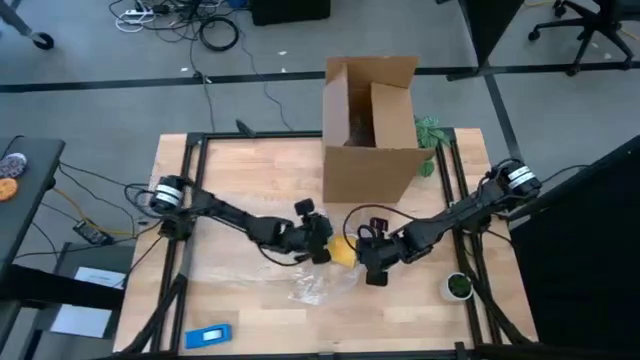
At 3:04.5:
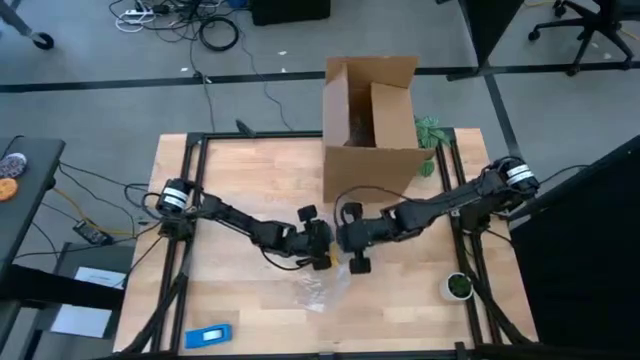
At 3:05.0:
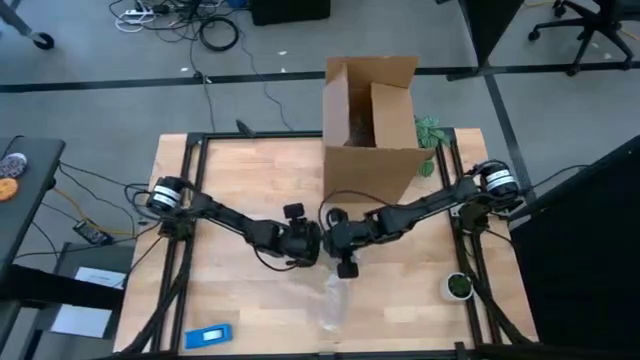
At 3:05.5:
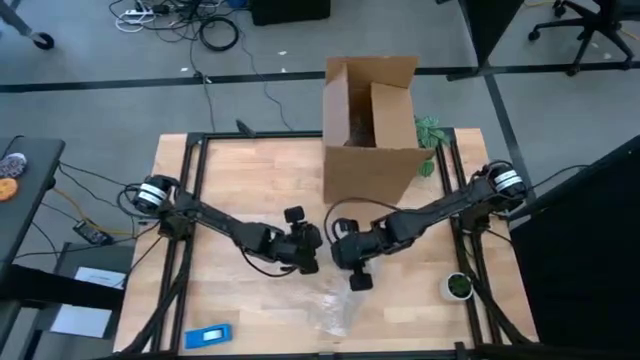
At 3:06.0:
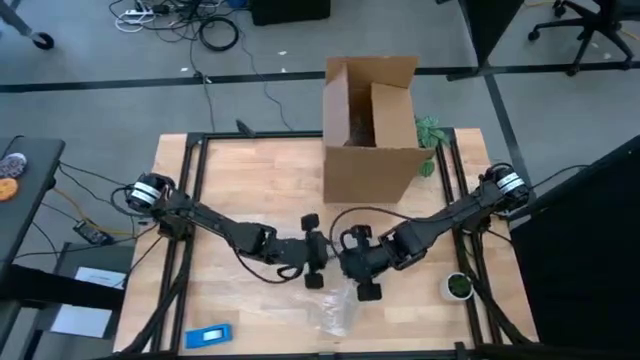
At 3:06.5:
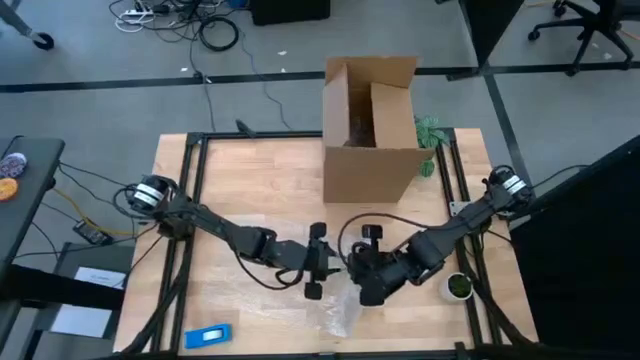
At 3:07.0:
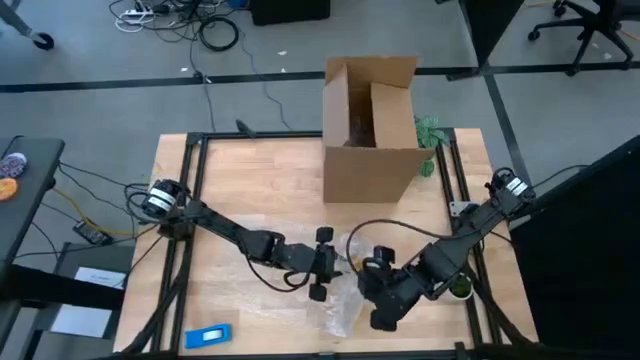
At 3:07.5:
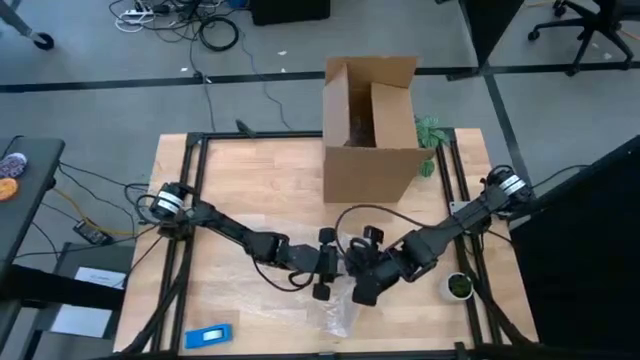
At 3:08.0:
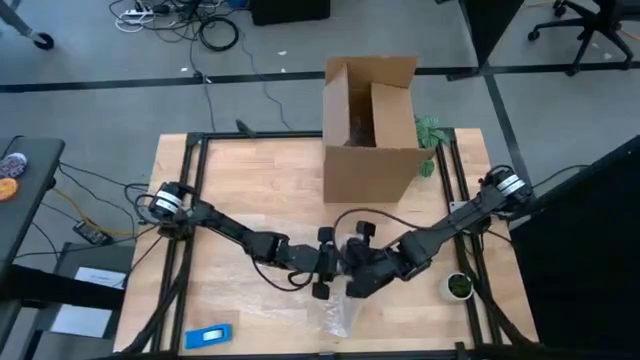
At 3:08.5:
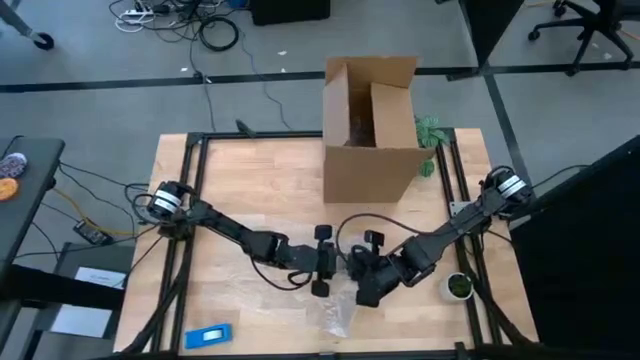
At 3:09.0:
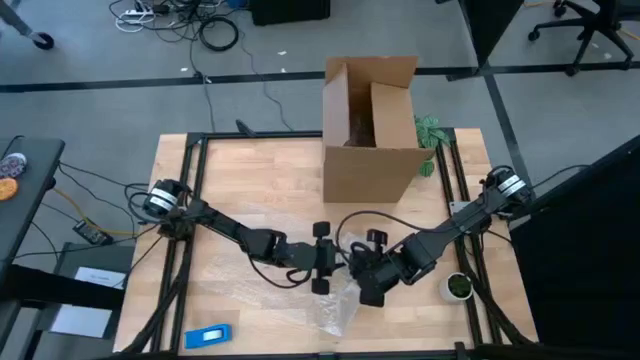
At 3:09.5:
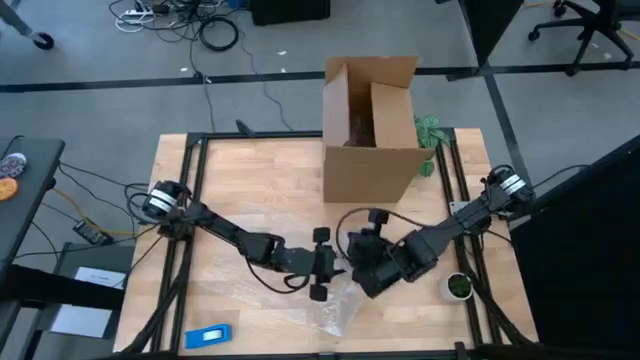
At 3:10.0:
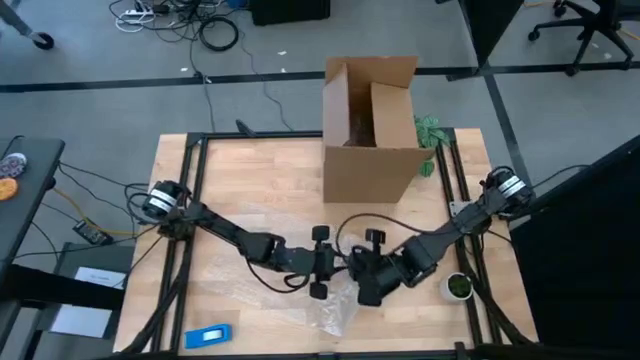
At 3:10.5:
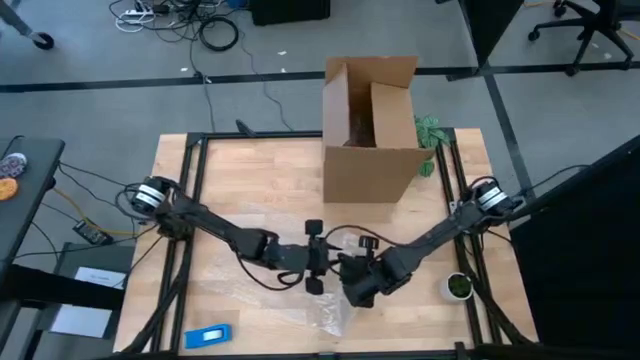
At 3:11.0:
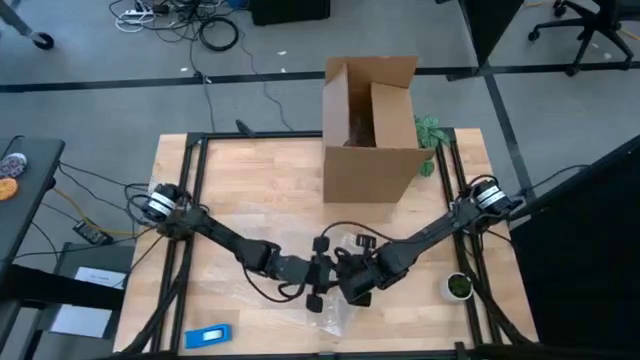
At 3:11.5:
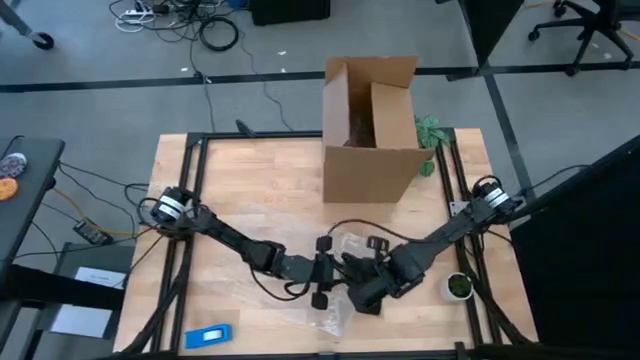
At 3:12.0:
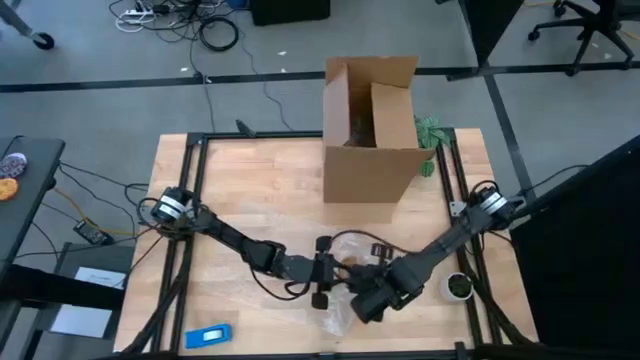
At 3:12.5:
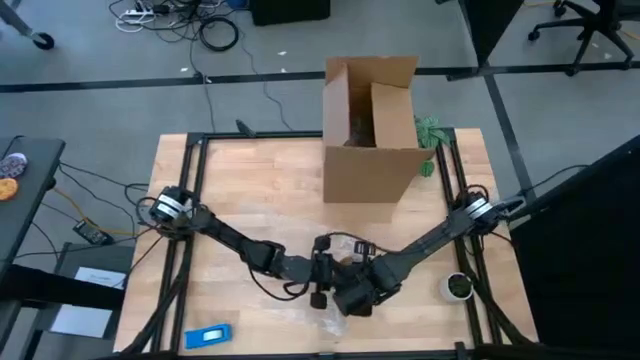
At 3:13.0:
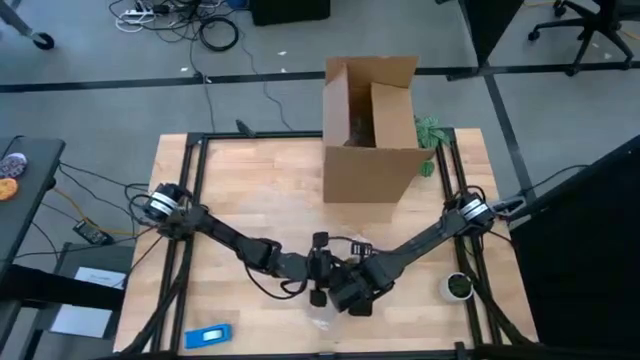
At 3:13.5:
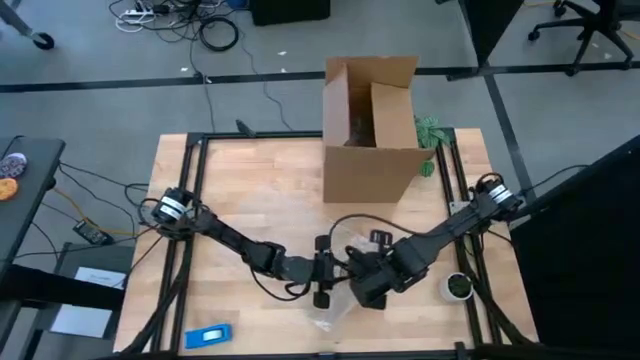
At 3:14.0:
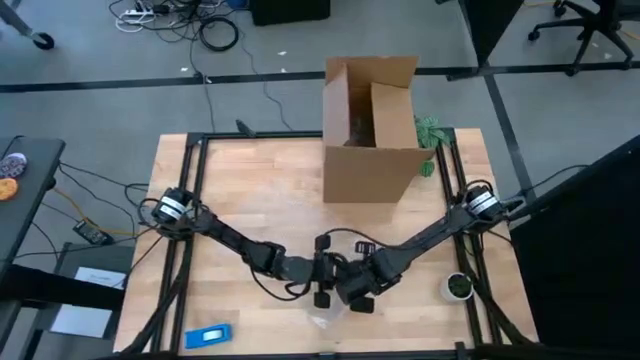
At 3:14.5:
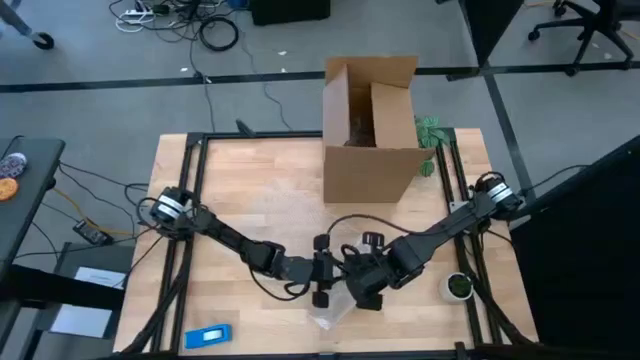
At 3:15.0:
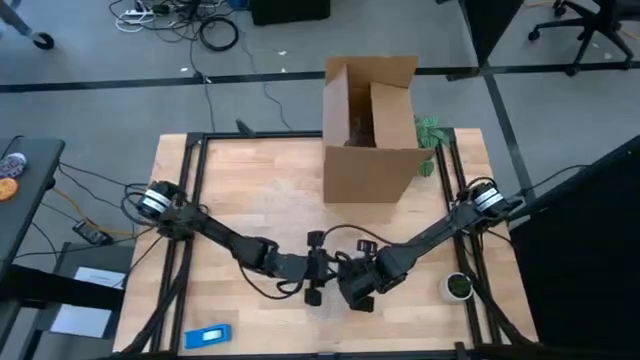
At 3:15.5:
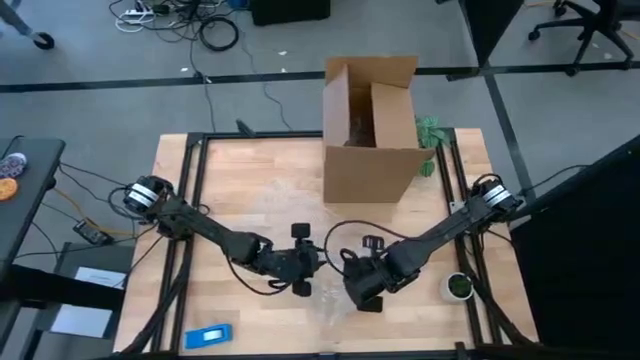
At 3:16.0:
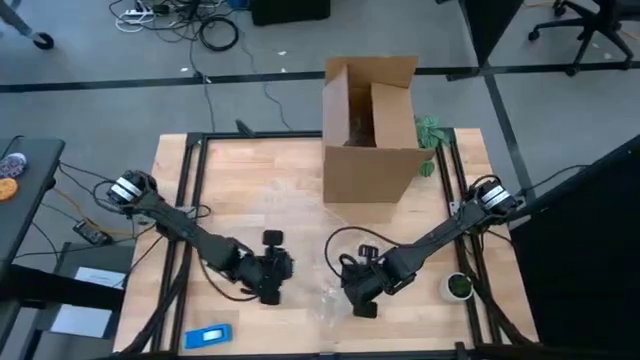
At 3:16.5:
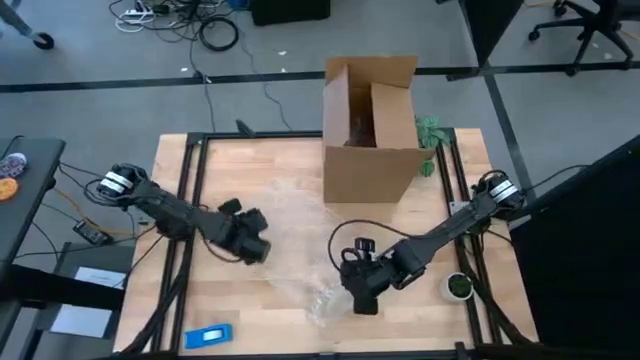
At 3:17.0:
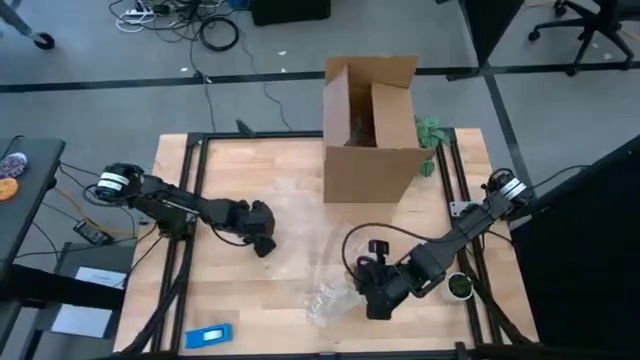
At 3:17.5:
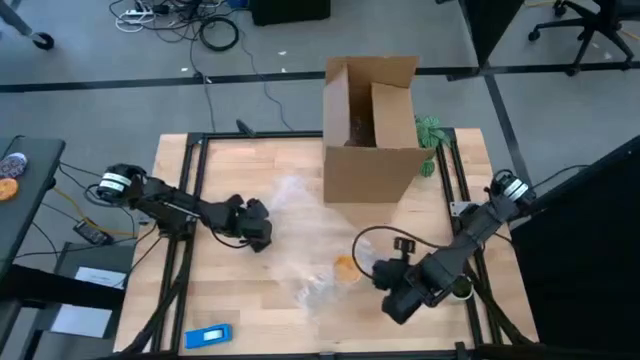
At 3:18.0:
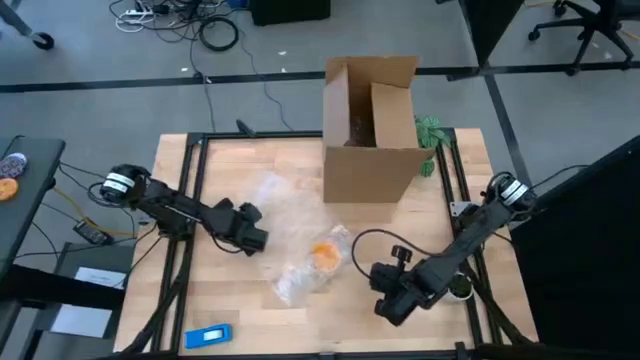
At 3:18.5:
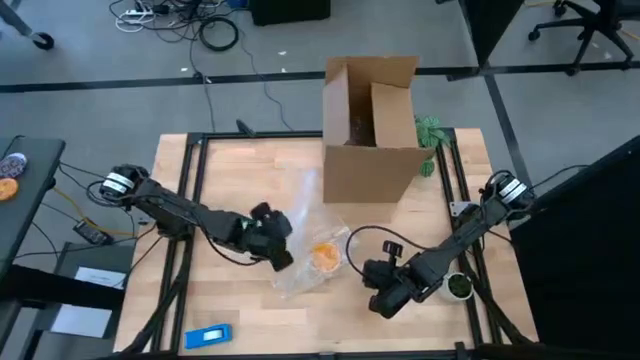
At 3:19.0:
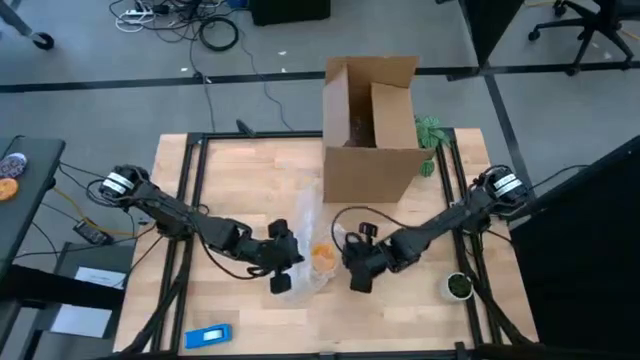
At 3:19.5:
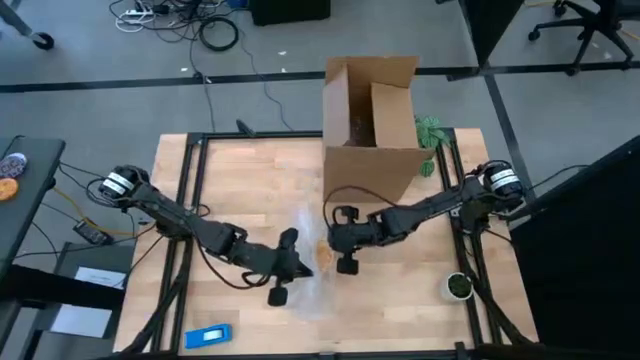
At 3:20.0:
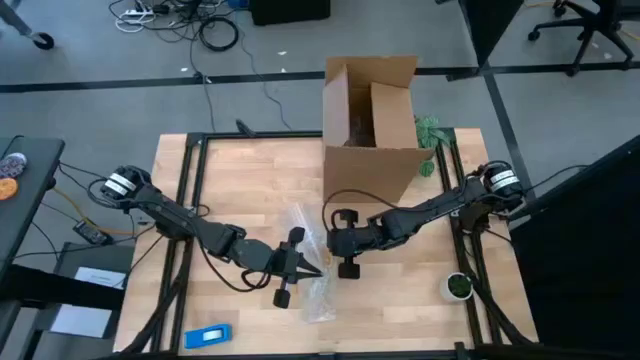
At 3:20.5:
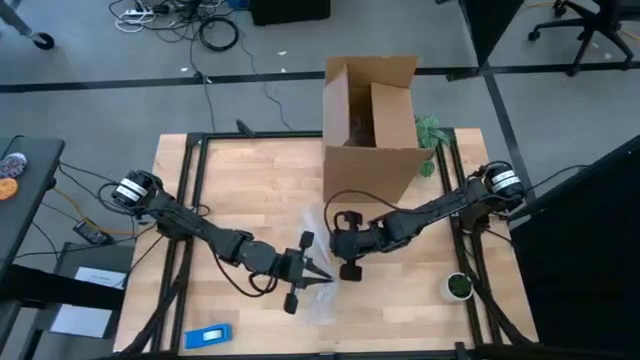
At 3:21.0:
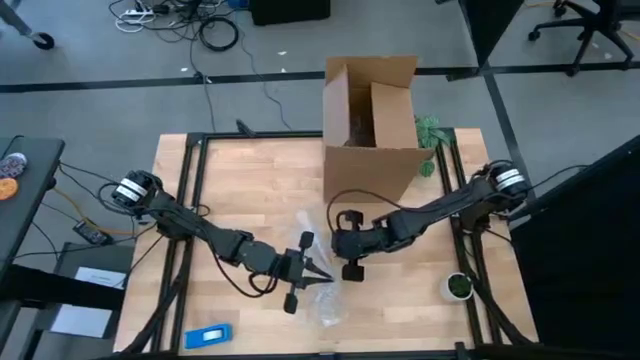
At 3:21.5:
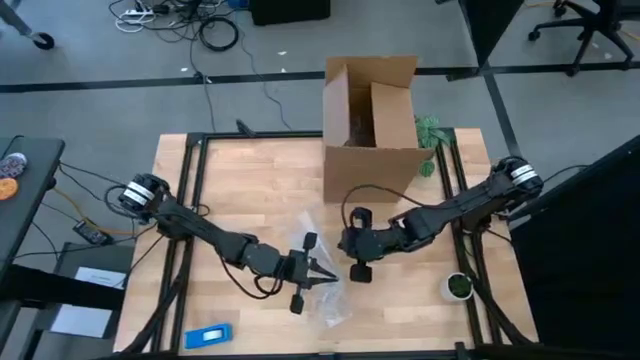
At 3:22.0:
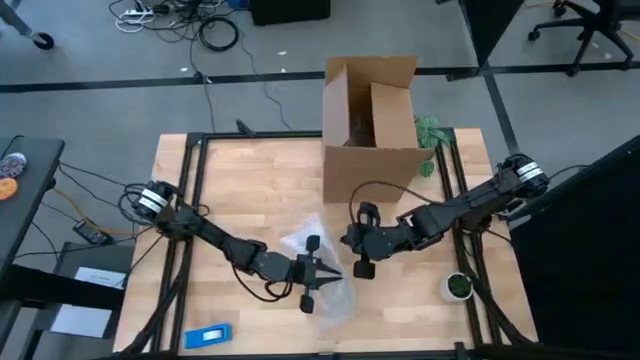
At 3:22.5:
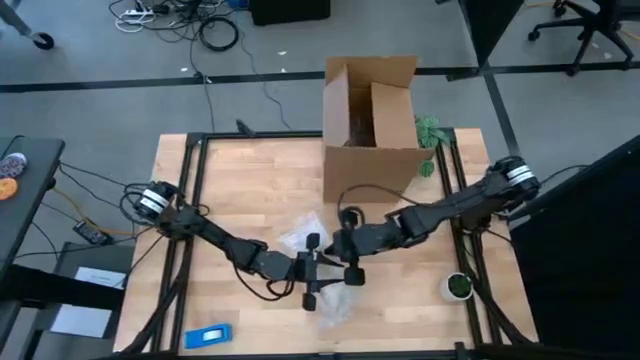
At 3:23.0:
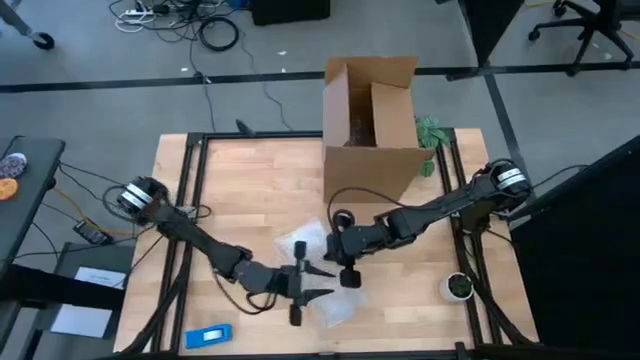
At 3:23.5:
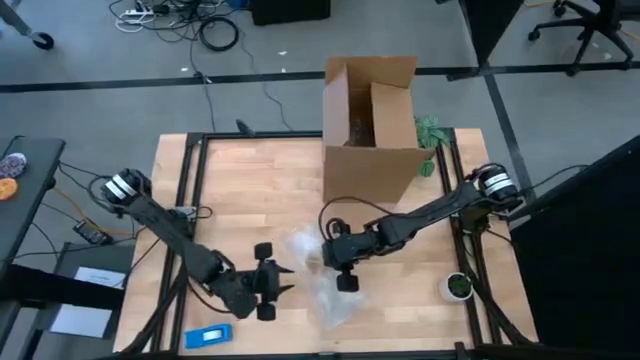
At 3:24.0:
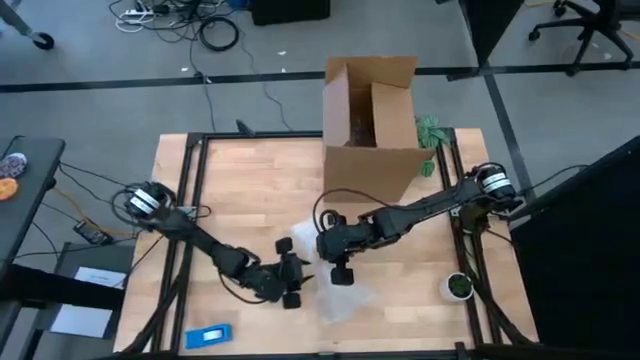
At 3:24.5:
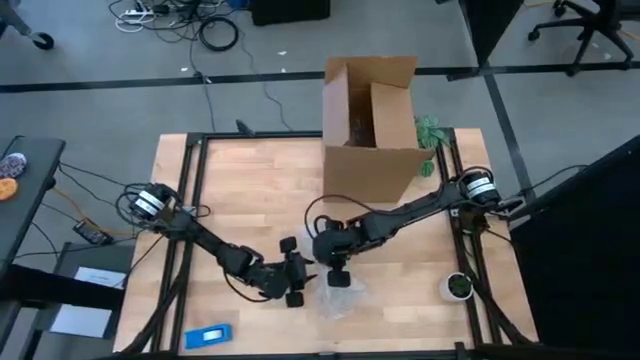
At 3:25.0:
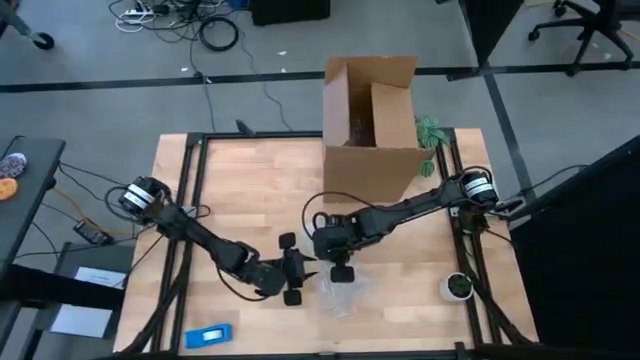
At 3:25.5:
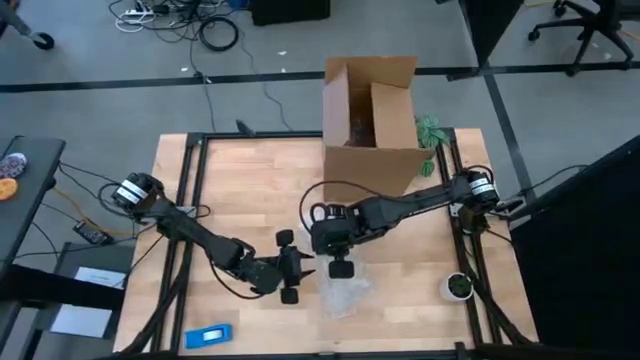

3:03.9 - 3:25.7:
Task: wrap mug
Wrap the yellow mug with transparent bubble wrap
